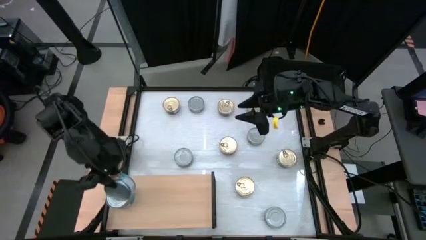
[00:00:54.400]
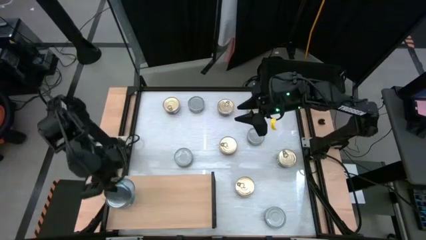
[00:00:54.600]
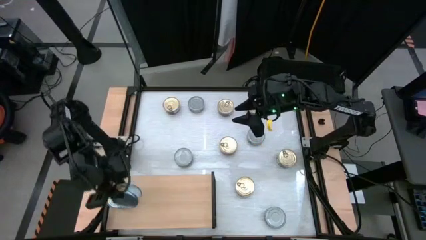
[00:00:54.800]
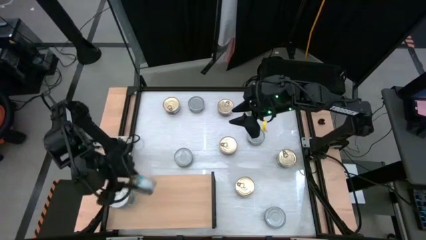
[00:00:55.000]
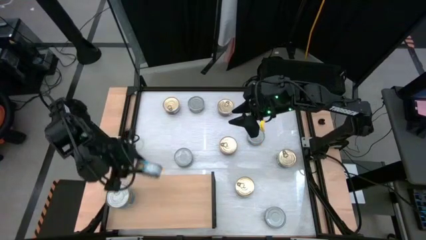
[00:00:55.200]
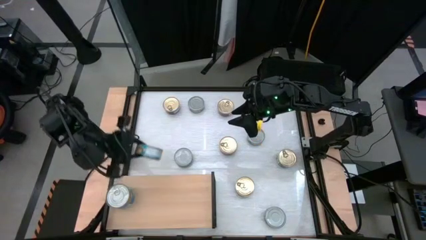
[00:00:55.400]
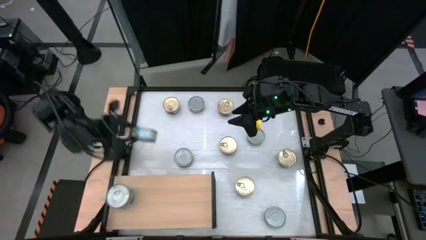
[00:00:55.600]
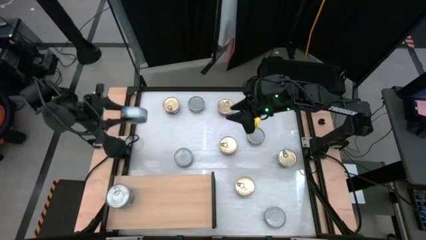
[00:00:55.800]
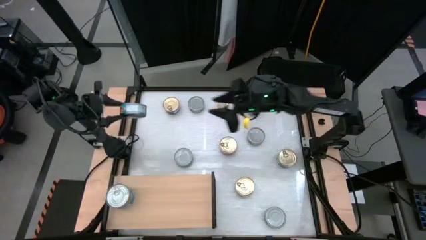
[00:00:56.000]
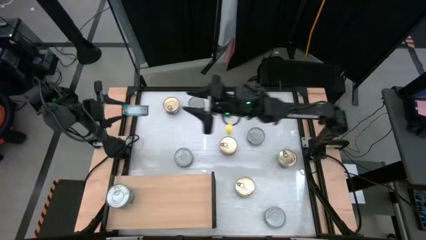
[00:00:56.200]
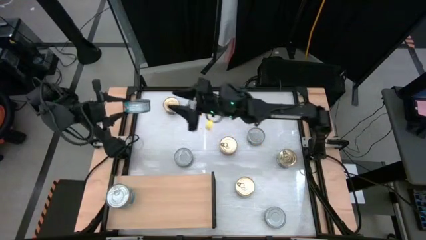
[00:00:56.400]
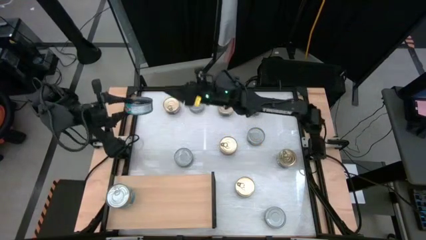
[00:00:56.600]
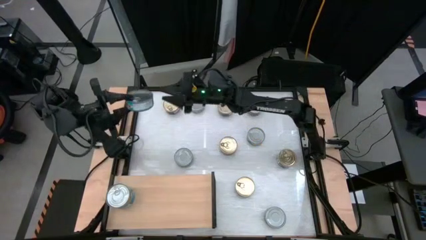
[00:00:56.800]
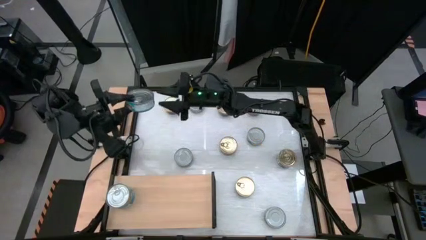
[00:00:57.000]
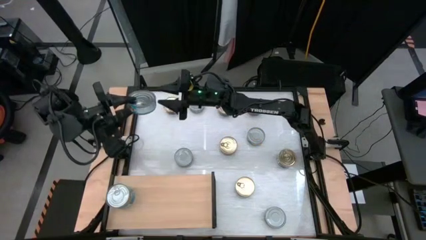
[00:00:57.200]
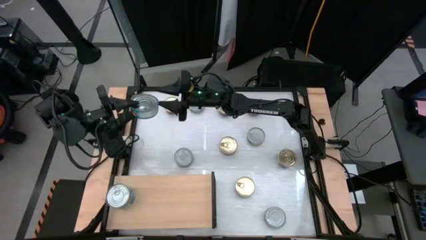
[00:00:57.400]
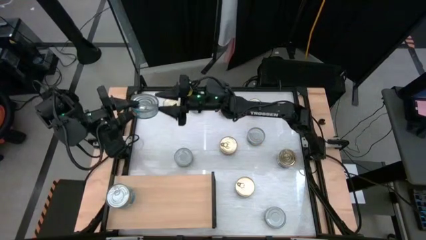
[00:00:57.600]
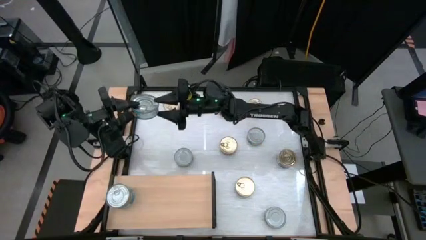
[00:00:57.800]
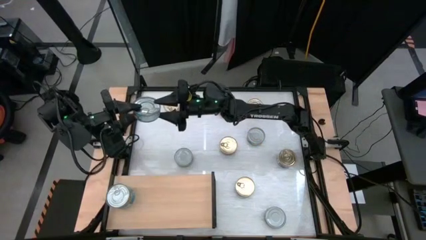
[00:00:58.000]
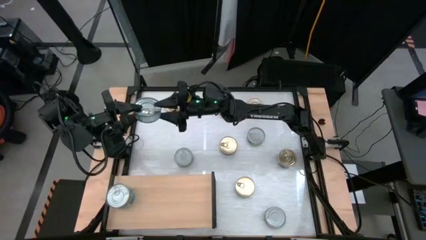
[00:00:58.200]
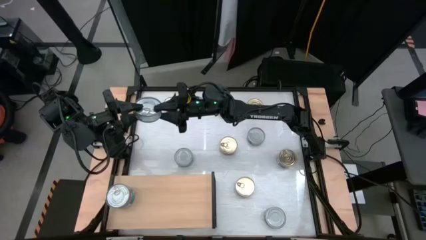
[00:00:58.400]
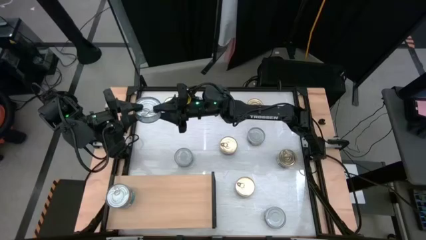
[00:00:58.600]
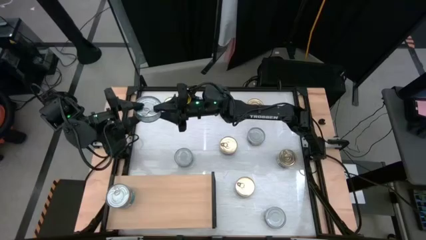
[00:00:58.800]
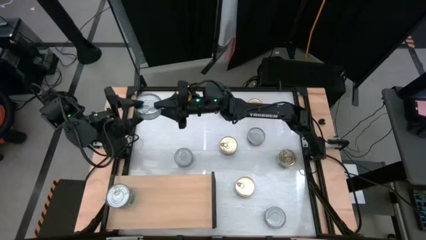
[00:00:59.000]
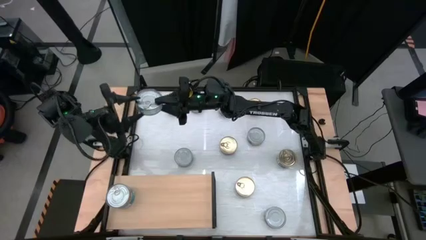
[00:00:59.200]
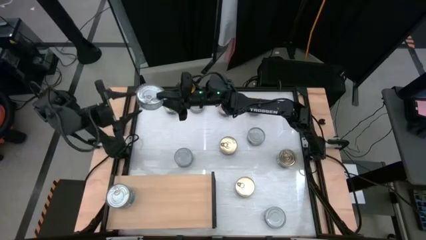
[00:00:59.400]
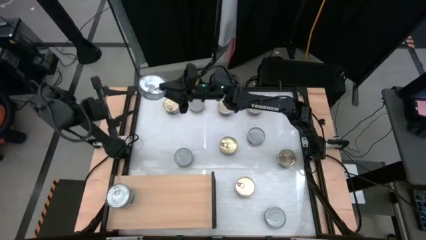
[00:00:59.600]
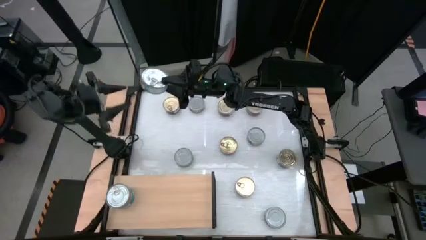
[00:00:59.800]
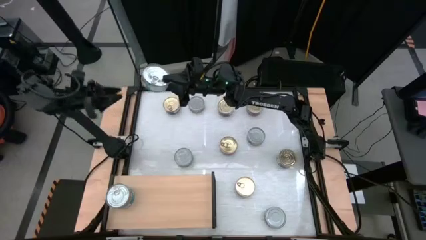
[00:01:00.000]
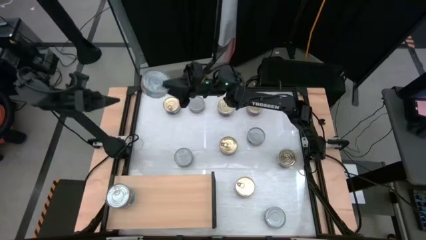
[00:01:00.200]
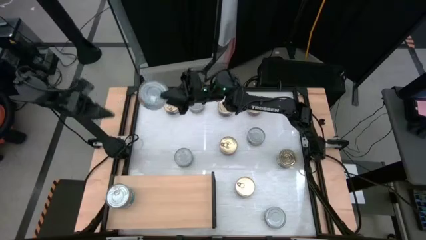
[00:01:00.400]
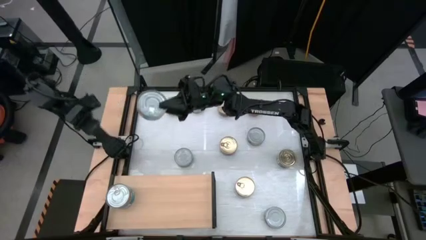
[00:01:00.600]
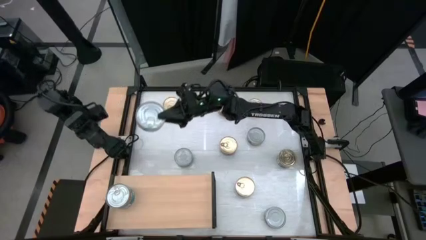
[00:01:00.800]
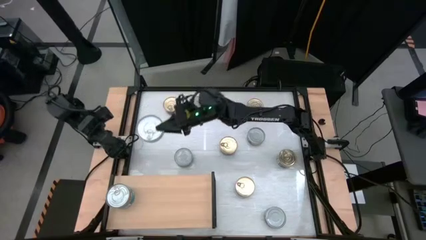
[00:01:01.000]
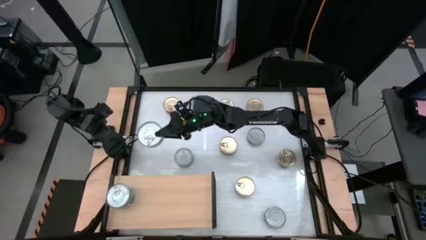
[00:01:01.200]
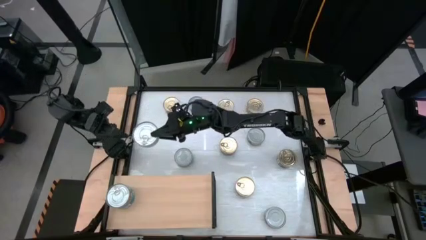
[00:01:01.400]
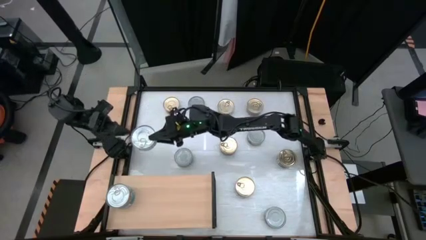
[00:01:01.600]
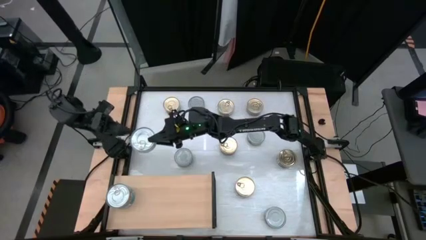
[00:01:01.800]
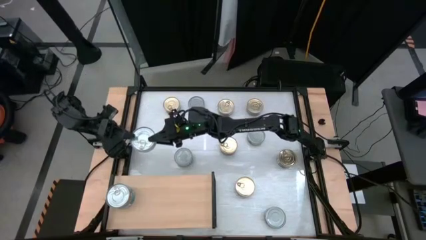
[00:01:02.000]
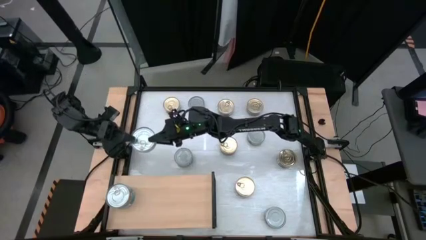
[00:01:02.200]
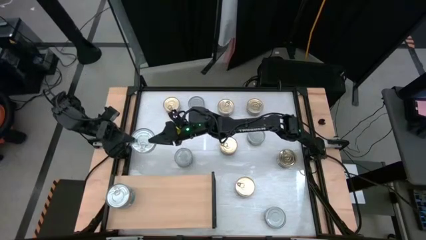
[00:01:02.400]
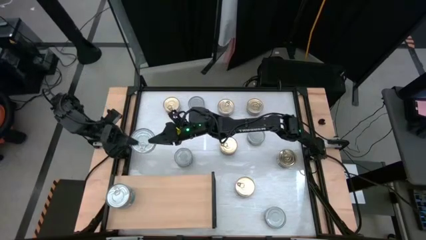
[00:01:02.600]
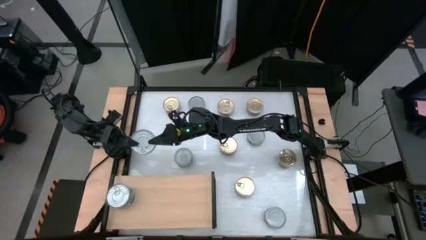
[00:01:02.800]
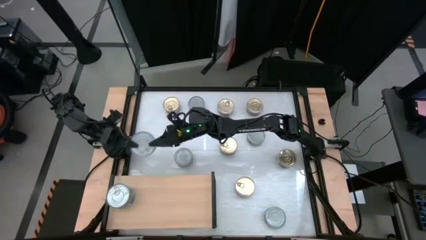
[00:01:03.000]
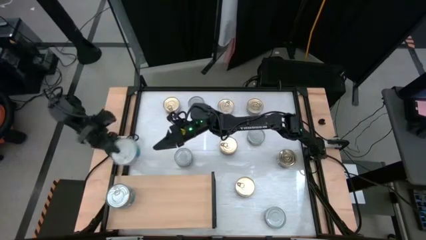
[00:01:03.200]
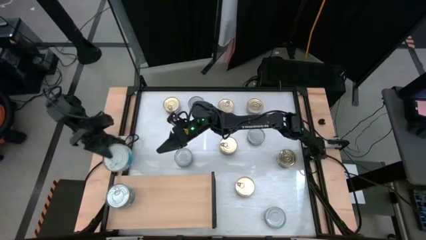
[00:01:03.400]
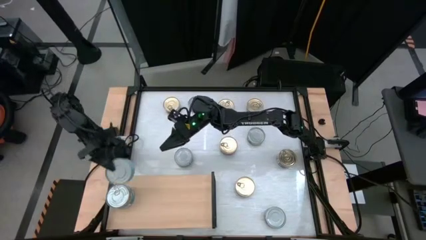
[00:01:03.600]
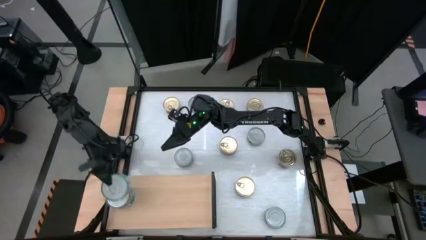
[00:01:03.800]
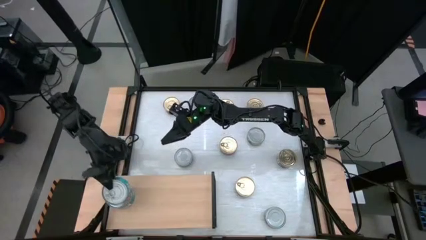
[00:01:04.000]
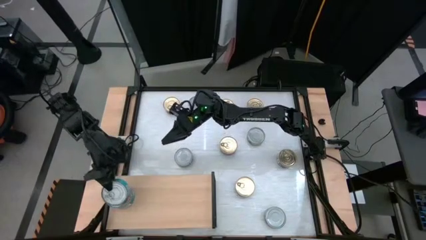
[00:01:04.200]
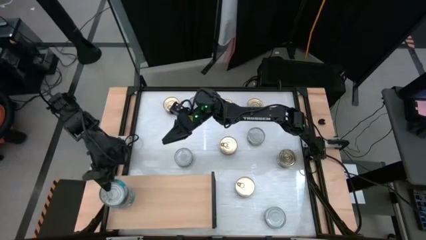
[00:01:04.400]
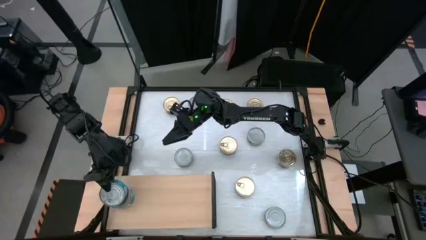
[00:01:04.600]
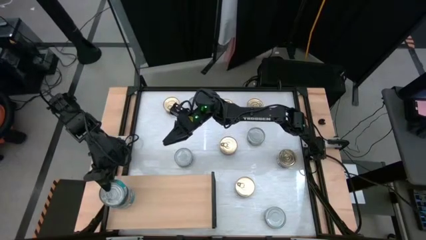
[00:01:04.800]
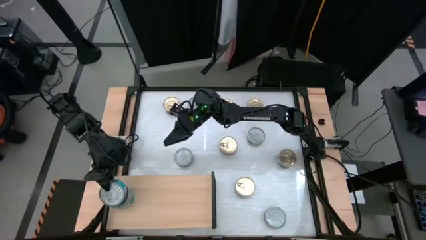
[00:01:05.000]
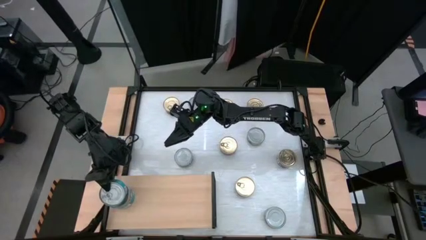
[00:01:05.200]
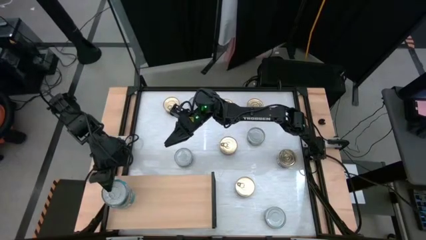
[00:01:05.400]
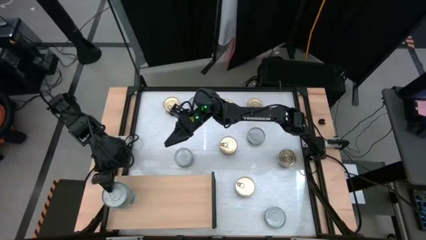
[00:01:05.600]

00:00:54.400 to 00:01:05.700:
Task: Stack canned seafood by type on shelf
Stack the yellow blue tuna can on top of the yellow blue tuna can on the shelf
